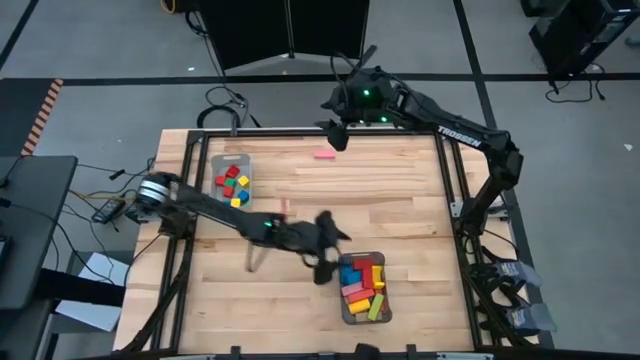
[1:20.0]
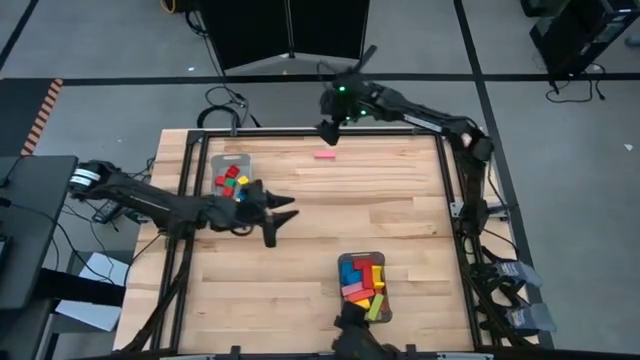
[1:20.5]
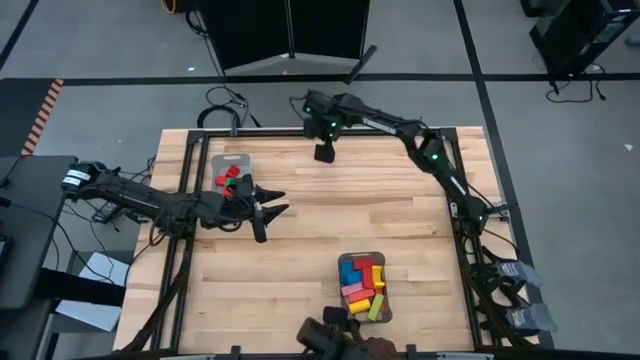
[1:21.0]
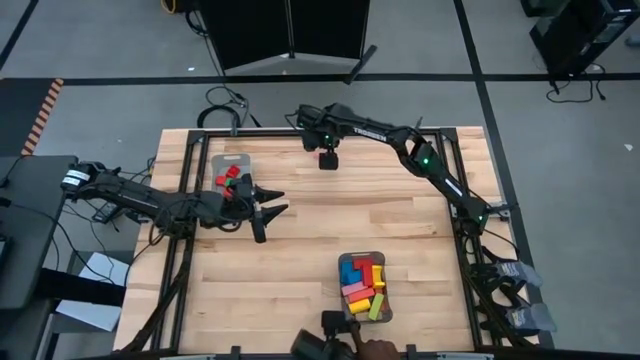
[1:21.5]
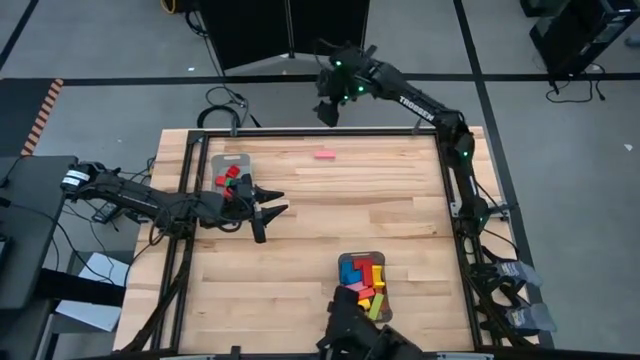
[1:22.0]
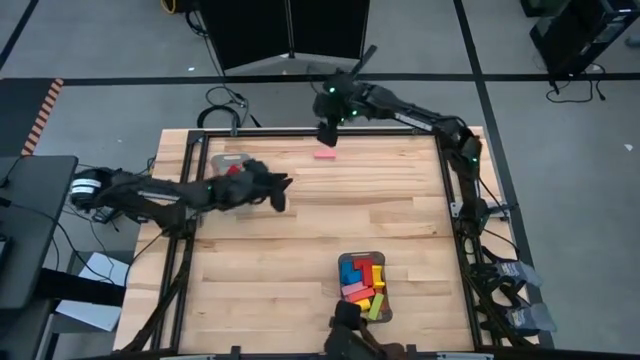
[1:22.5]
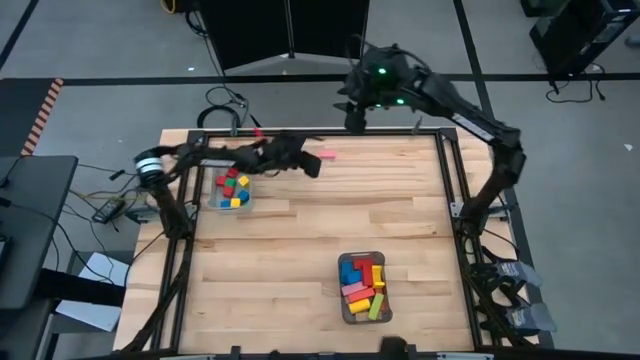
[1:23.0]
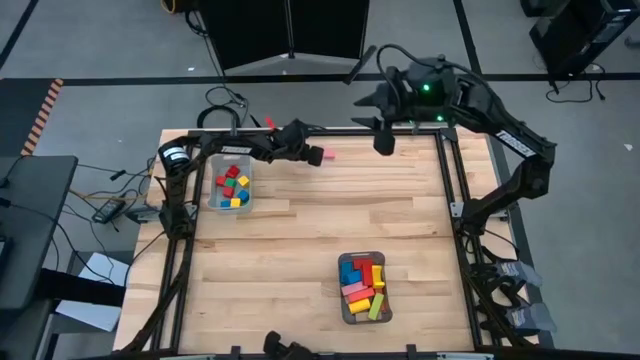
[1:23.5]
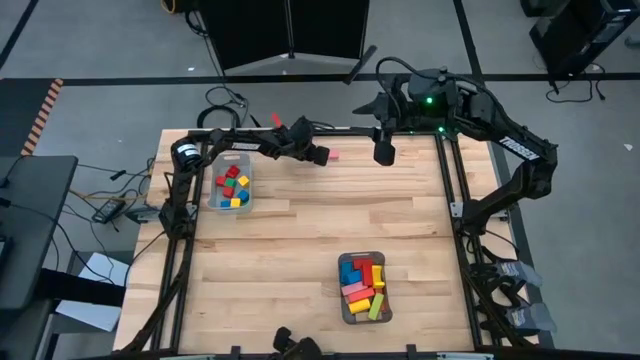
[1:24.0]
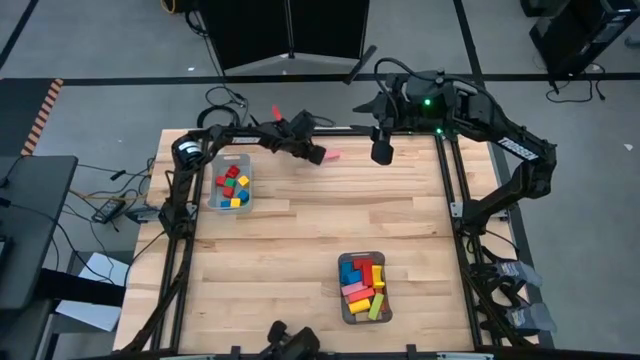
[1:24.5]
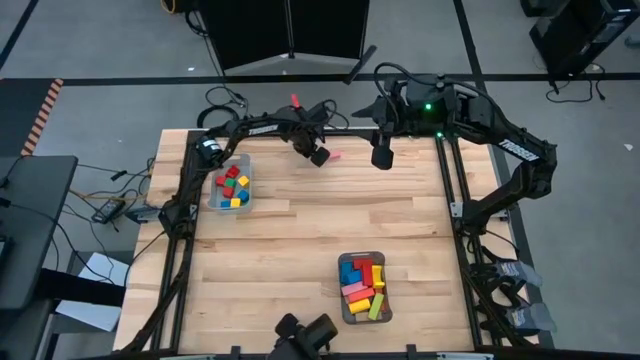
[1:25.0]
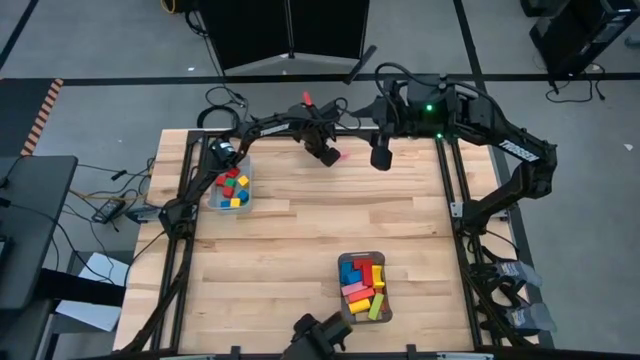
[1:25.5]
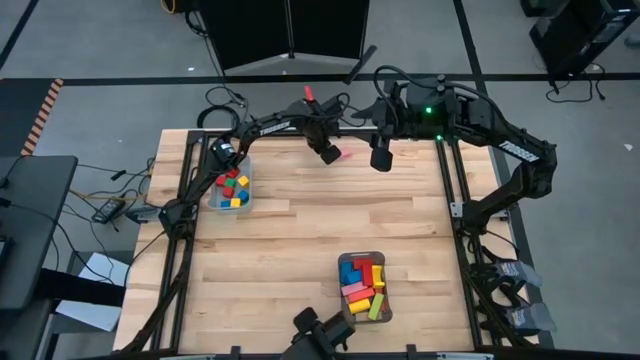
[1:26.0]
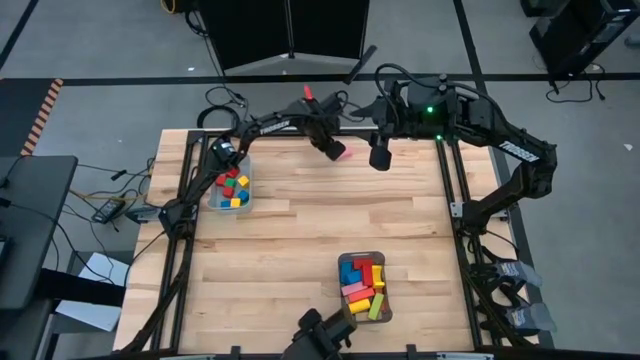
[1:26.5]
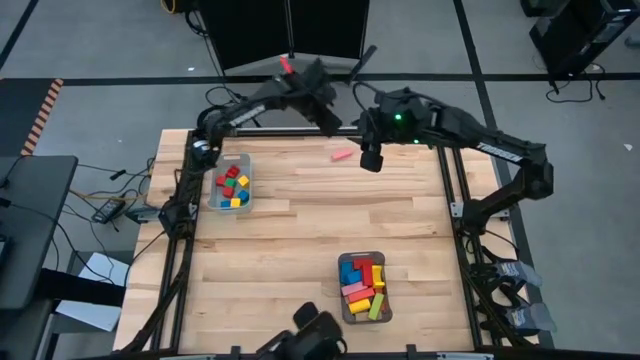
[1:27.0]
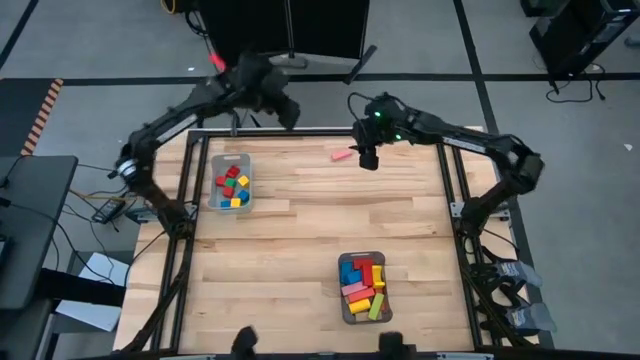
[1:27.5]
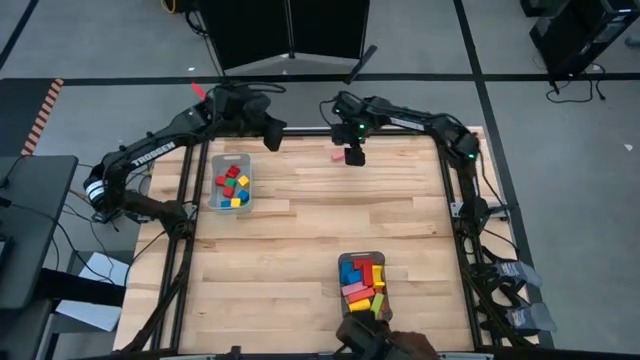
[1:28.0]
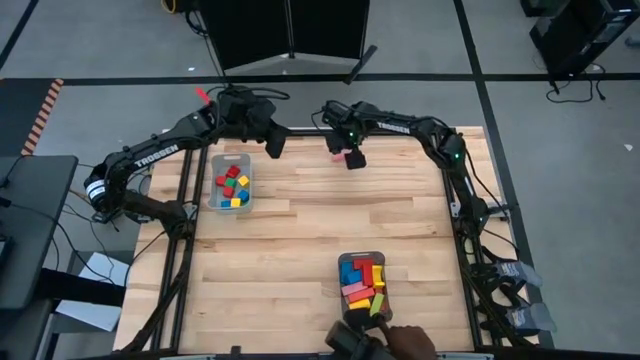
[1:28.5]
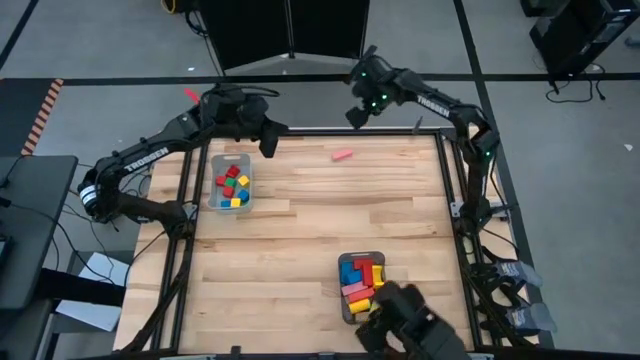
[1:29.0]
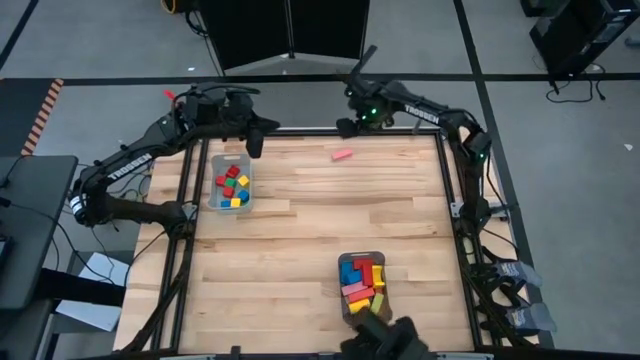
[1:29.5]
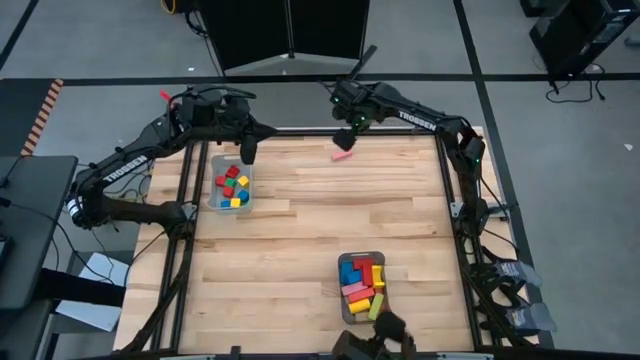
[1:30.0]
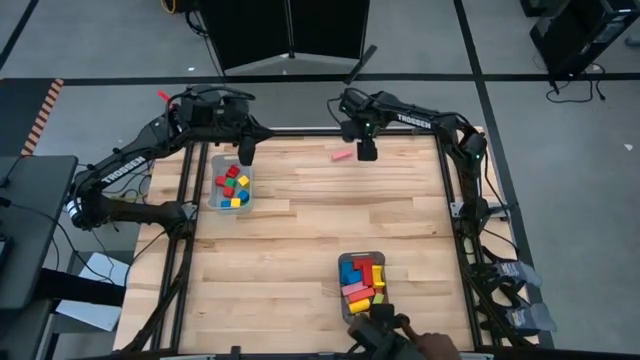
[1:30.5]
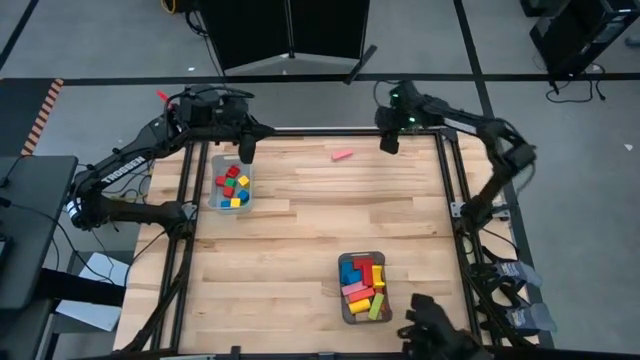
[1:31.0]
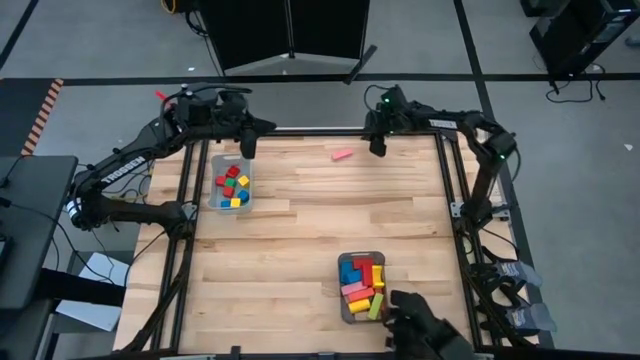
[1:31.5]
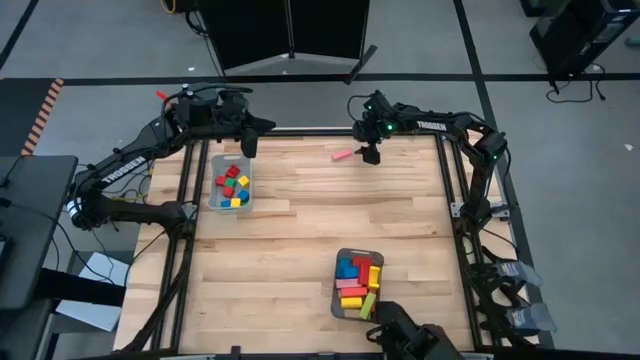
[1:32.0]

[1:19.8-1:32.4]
Task: Sort blocks by size
Put the pink rectangular block into the black bin

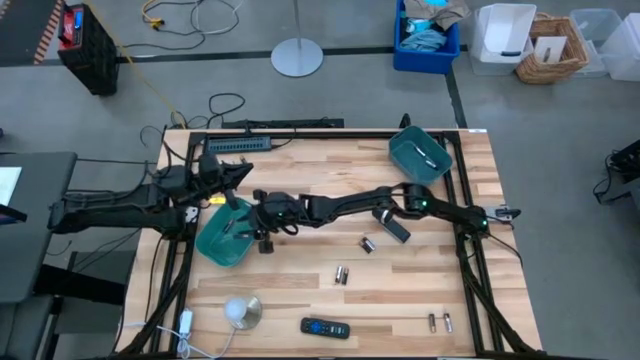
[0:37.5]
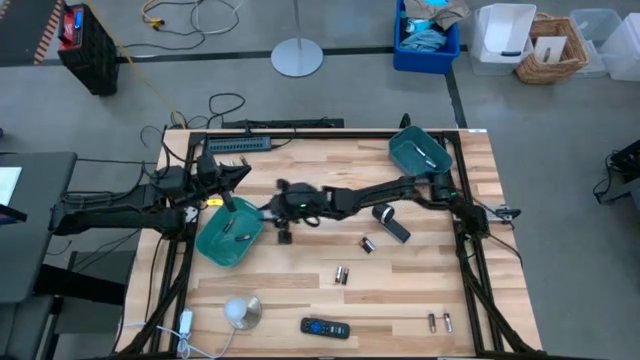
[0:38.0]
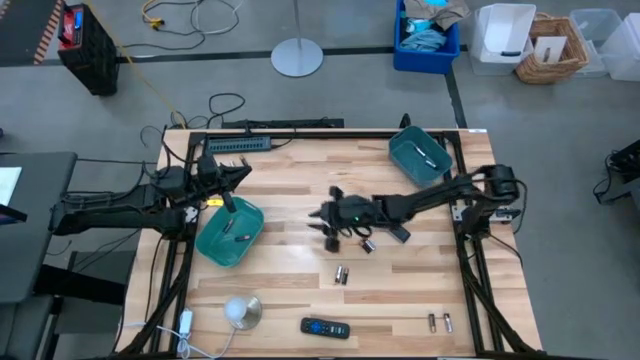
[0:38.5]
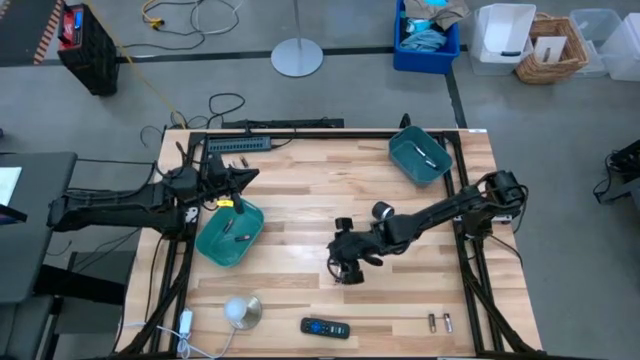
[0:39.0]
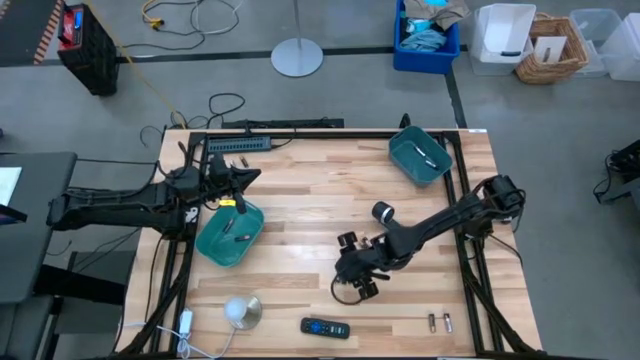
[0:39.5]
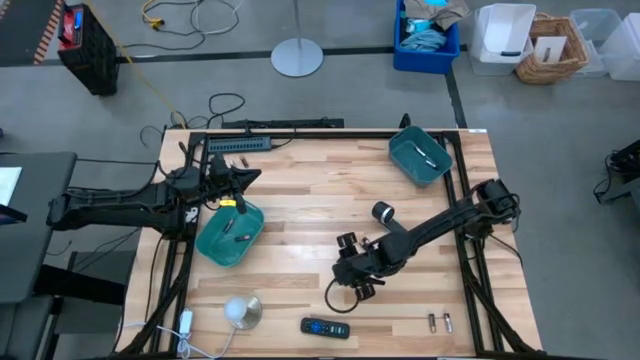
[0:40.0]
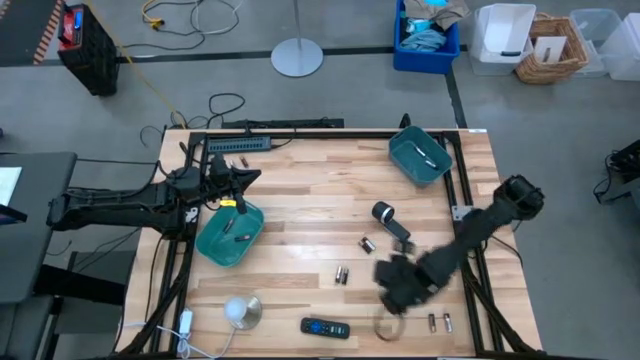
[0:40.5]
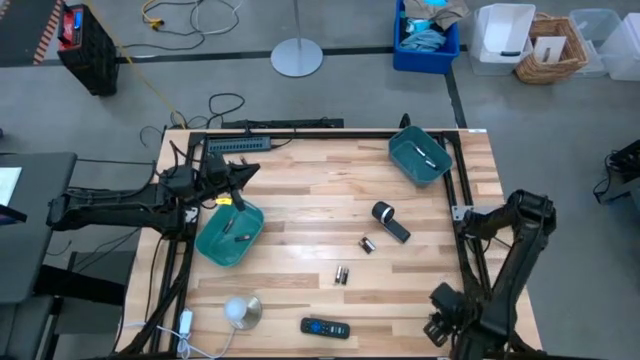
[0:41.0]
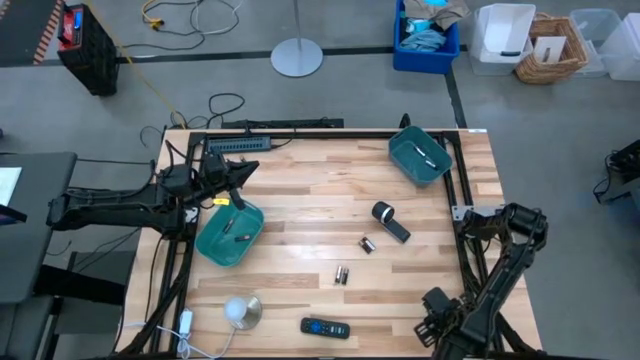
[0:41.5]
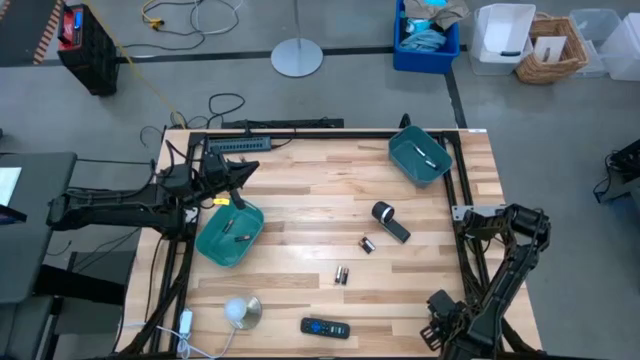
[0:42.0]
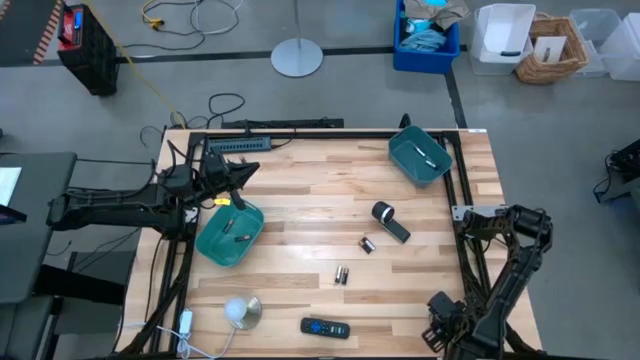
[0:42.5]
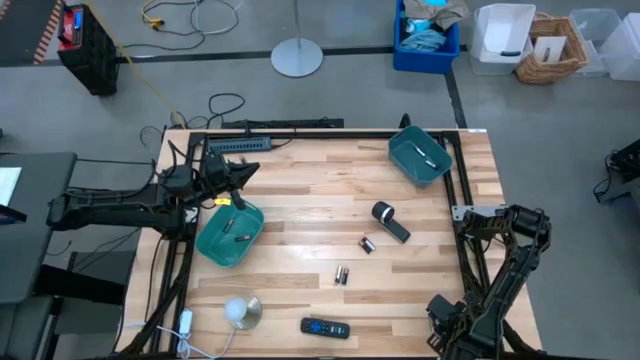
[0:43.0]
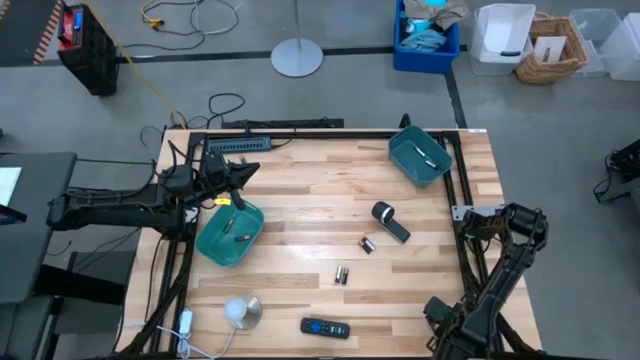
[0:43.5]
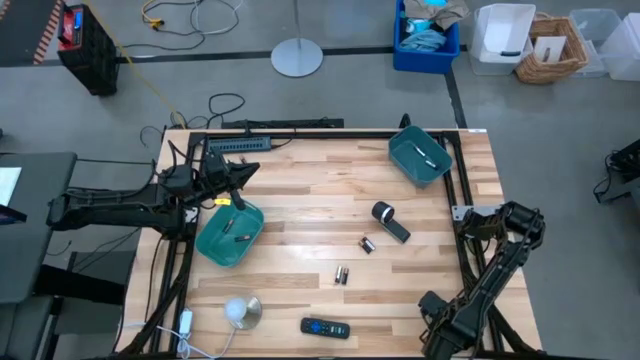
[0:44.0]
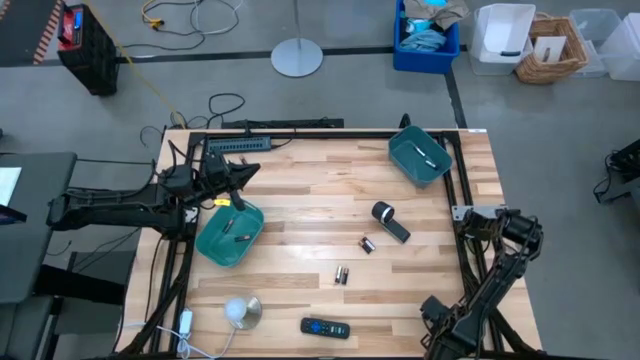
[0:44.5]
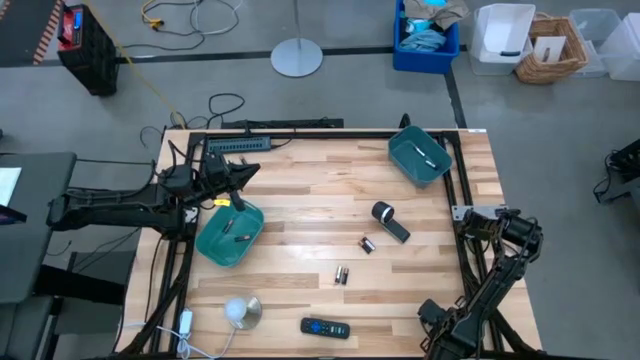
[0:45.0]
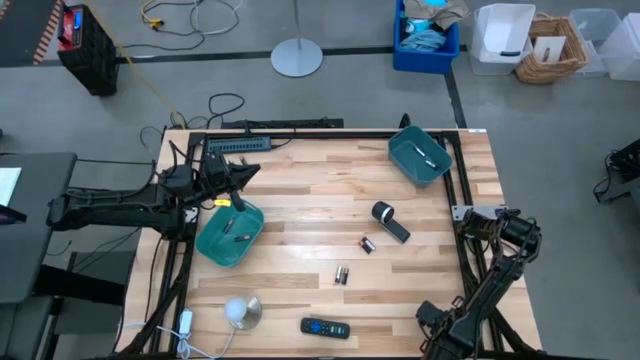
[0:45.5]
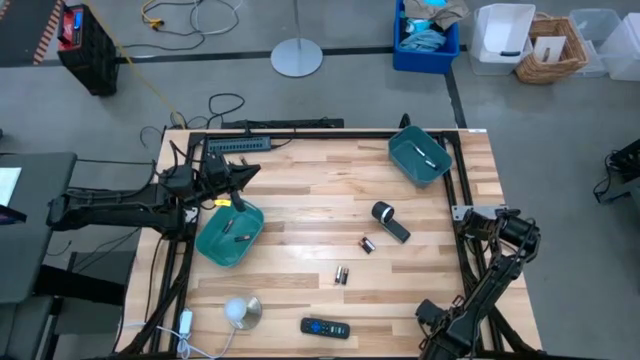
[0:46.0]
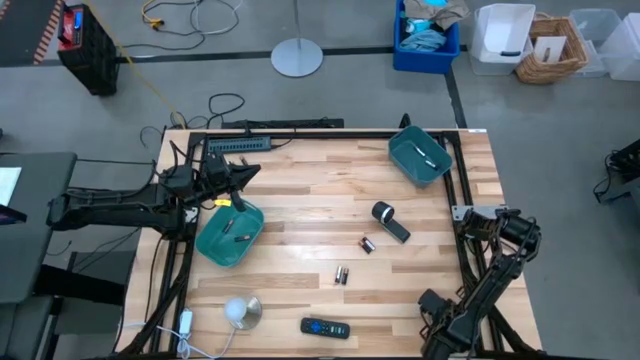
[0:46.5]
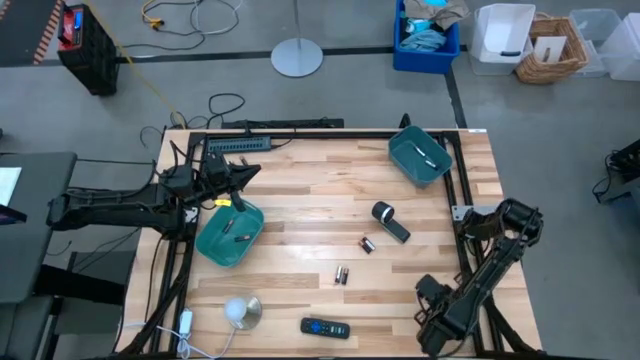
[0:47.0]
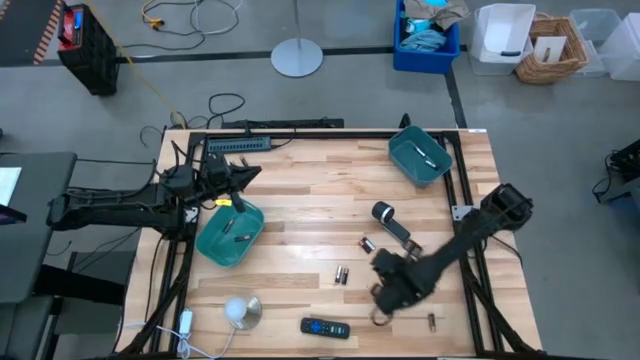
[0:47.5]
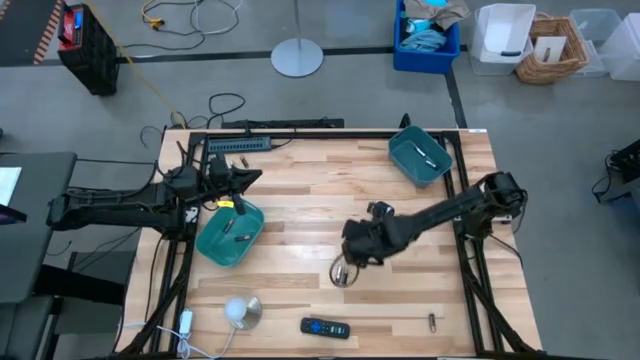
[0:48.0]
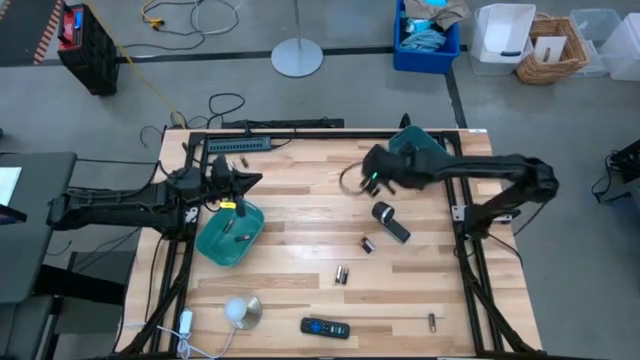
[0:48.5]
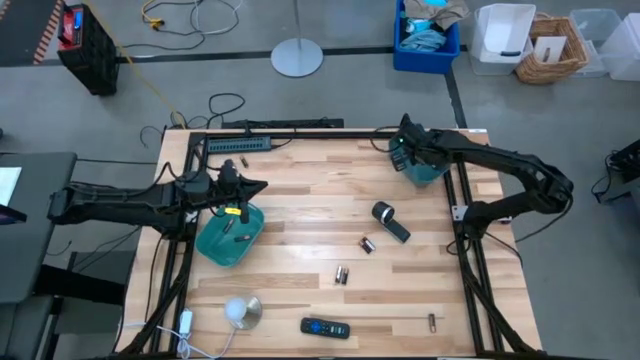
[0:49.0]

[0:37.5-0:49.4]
Task: Sort batteries
Put the silver battery into the blue bin
